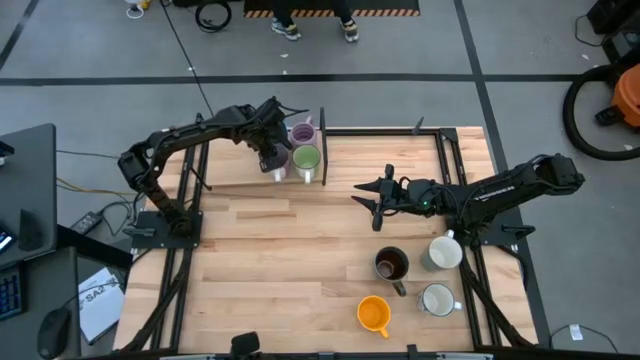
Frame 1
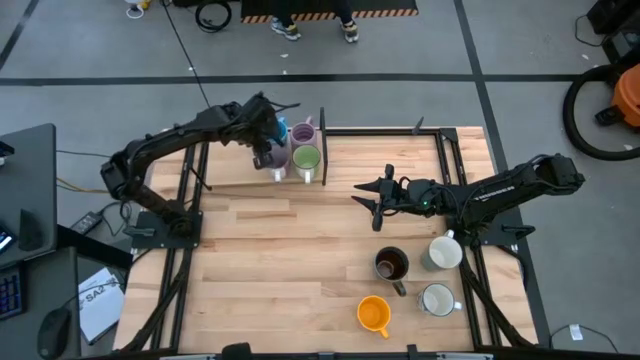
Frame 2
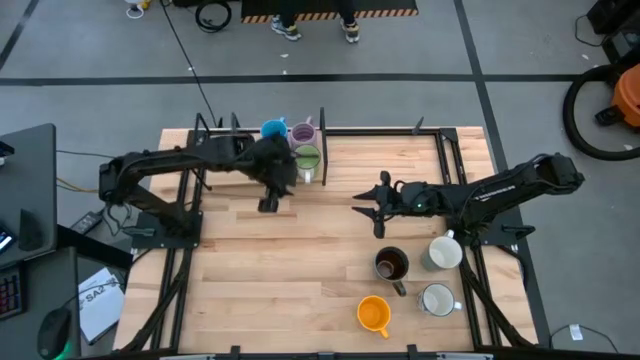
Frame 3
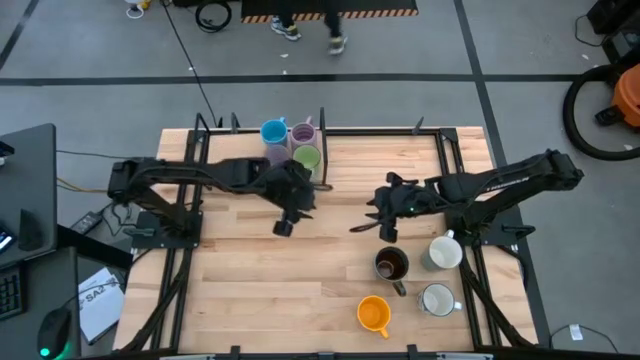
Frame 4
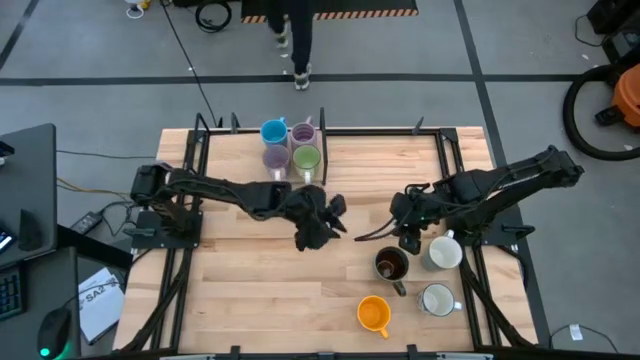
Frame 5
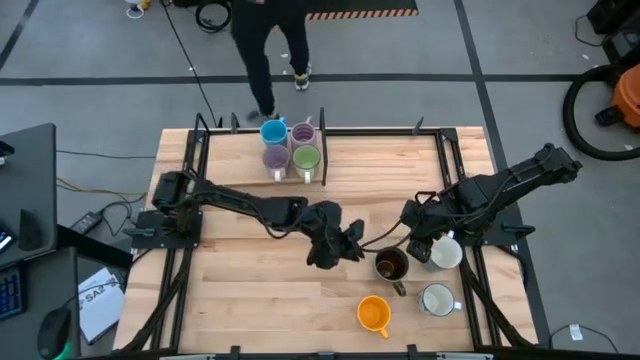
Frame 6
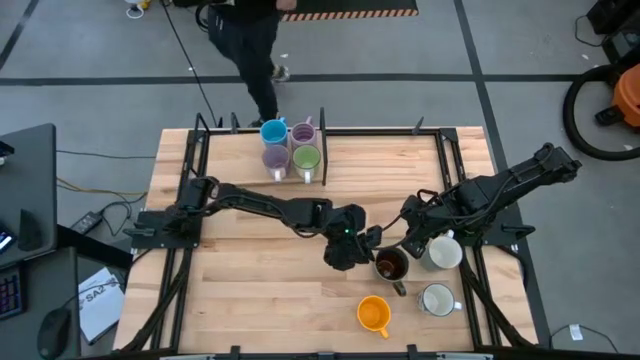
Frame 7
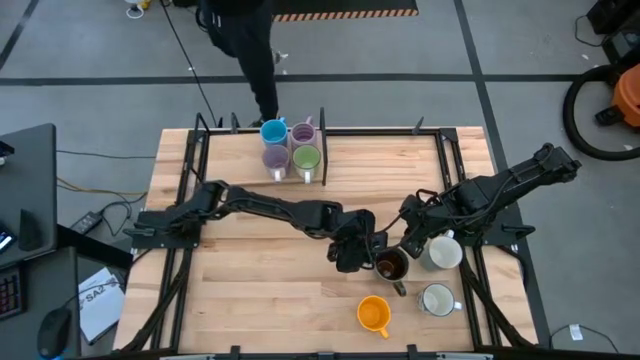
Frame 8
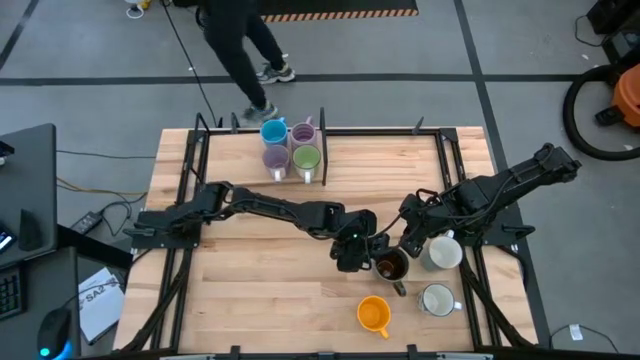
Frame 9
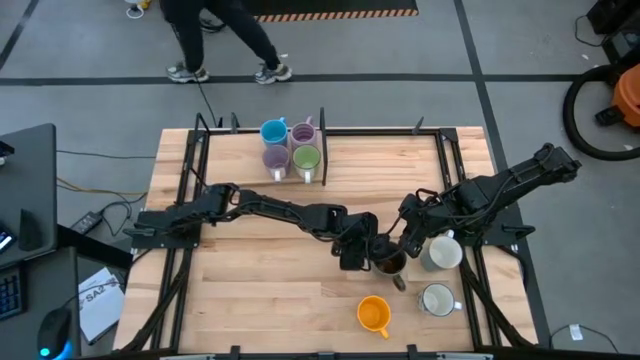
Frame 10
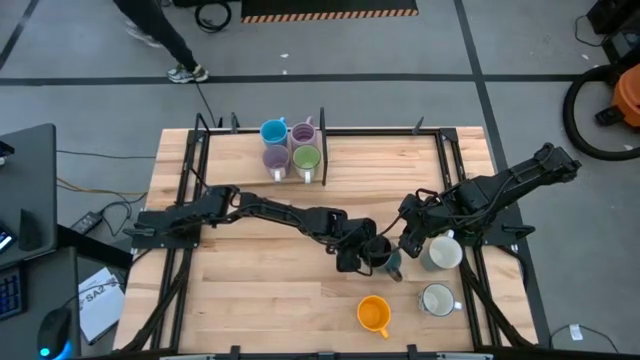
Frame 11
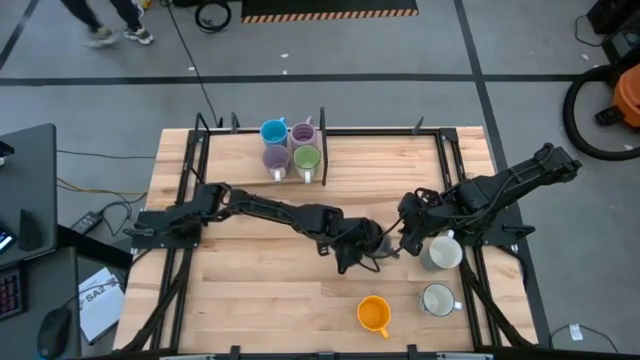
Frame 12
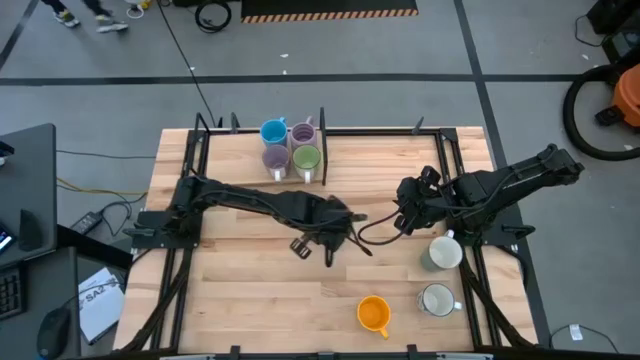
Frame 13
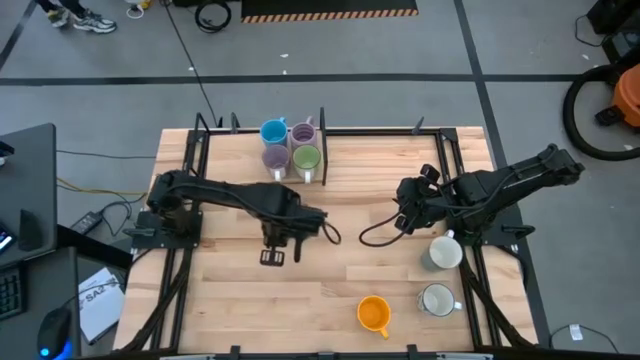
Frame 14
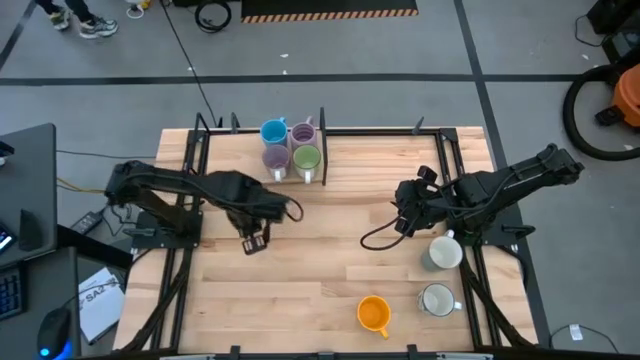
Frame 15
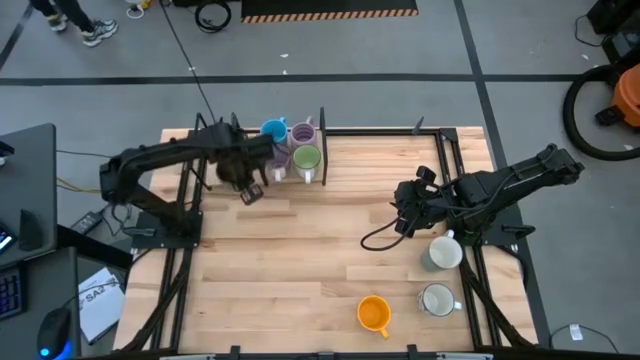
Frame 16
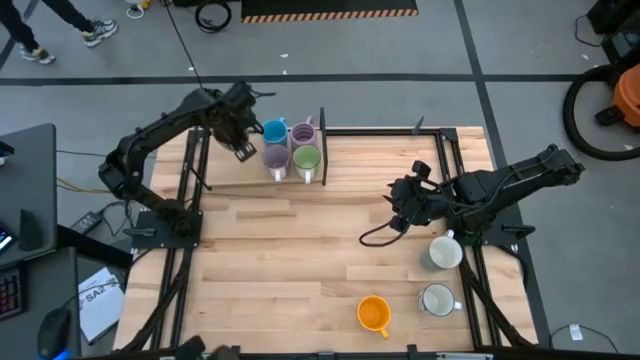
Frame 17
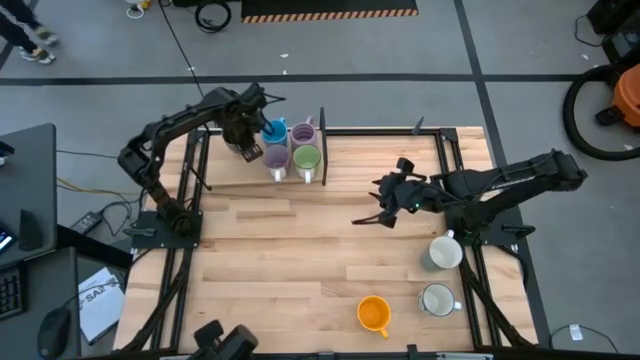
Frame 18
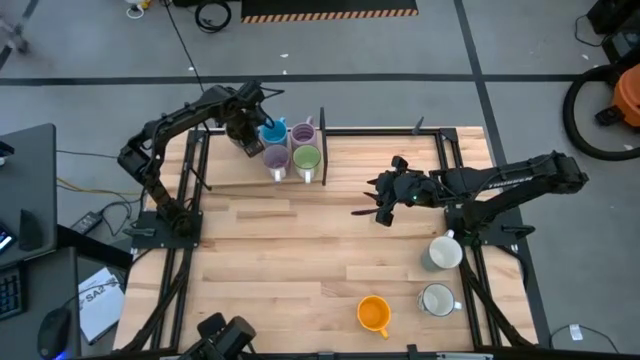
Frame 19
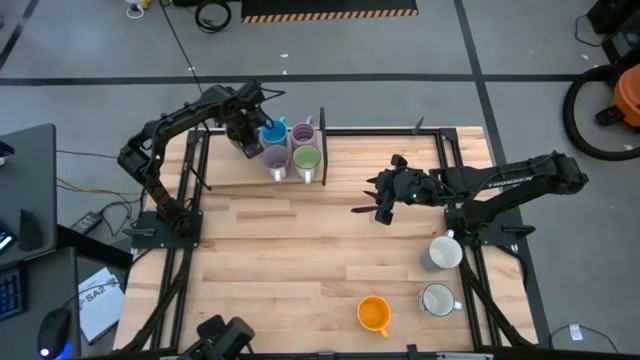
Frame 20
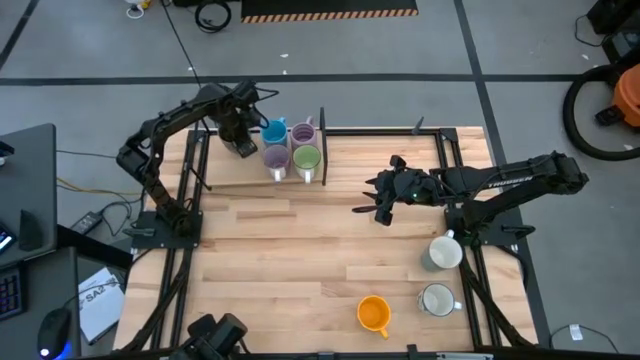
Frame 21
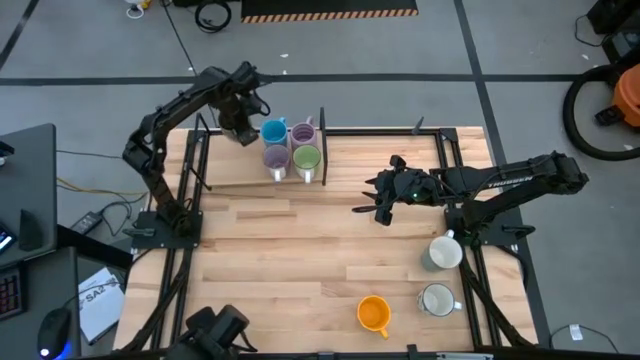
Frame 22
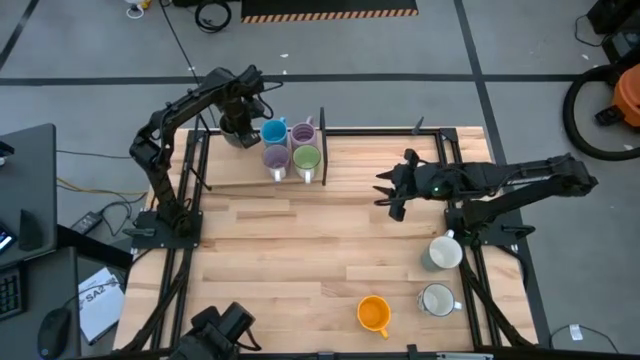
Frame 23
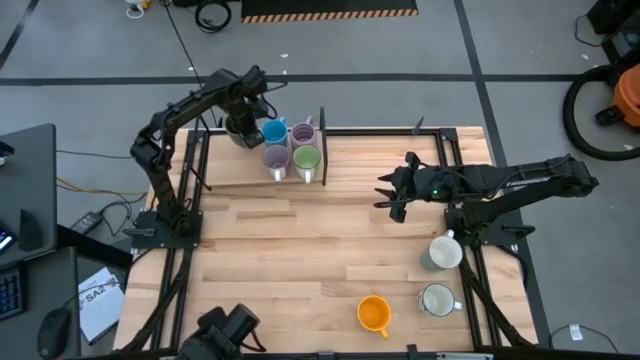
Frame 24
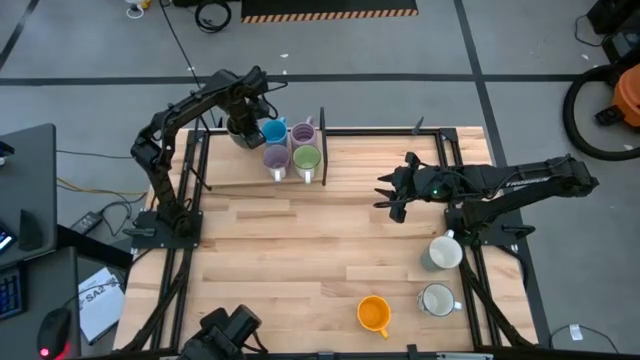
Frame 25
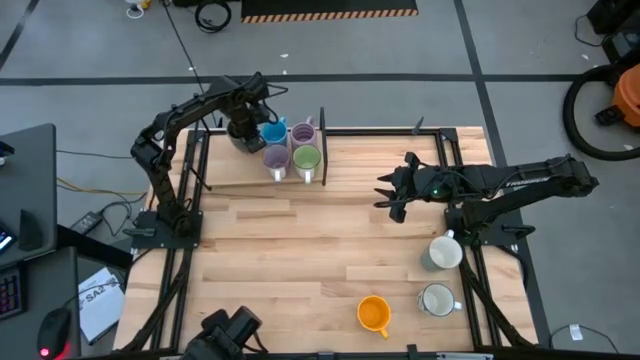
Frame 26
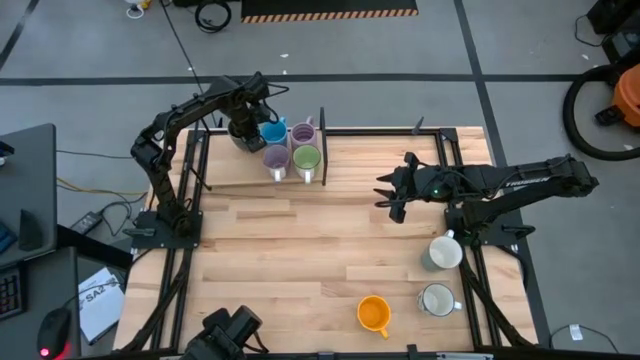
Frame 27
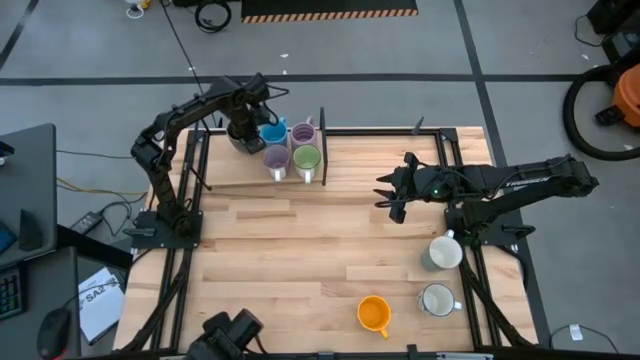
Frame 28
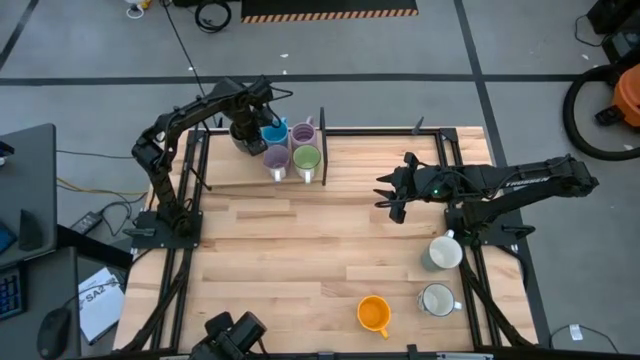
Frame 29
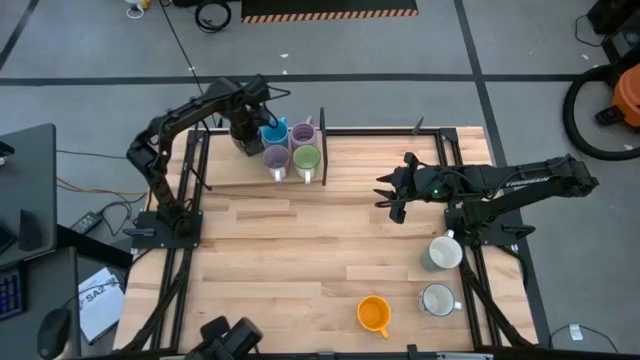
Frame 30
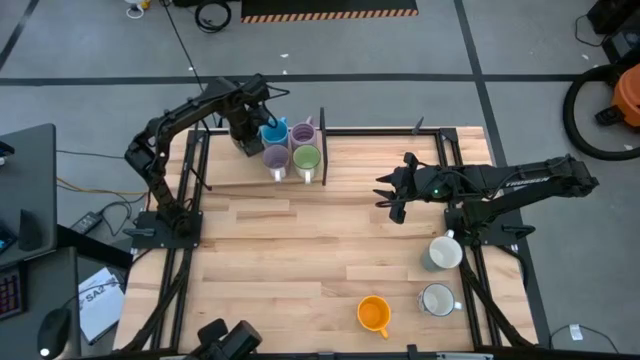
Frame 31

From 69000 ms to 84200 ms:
Task: Place coffee mugs
Put the dark blue patterned mug on the shelf

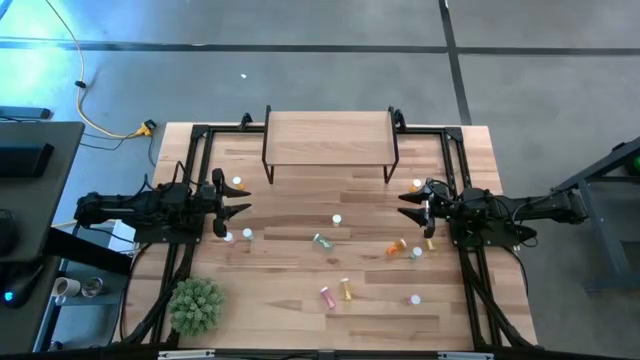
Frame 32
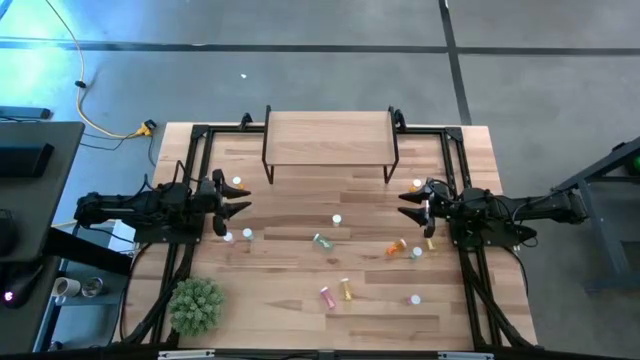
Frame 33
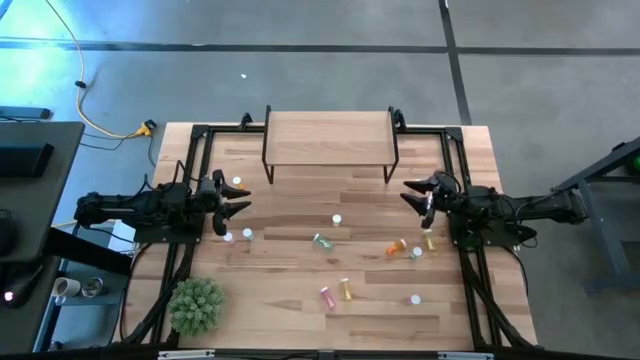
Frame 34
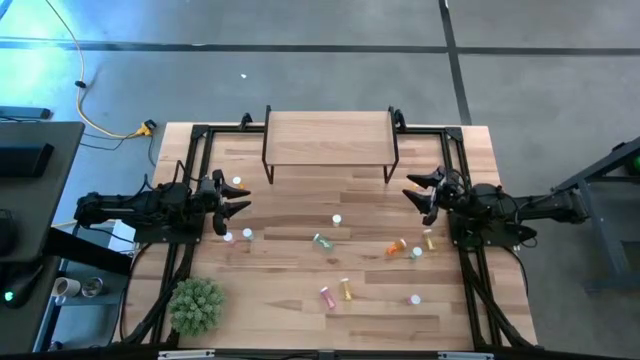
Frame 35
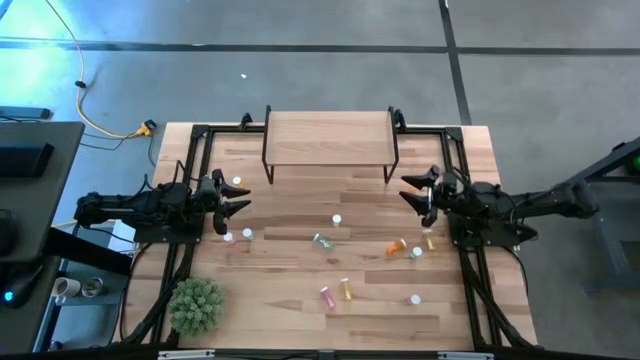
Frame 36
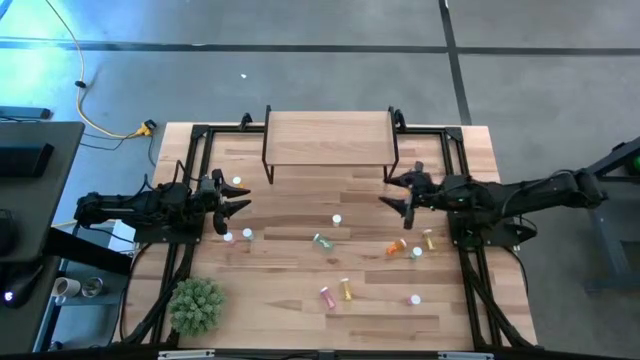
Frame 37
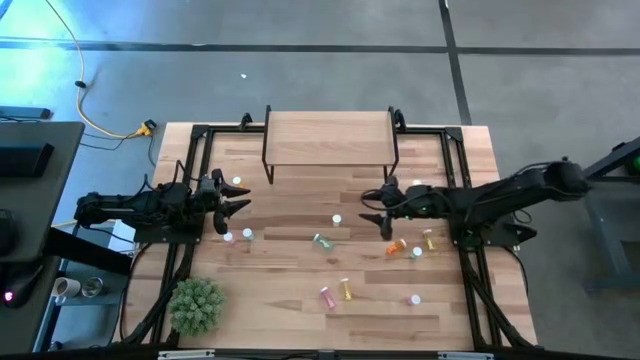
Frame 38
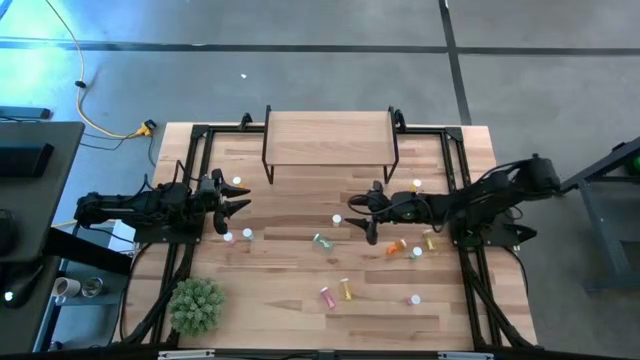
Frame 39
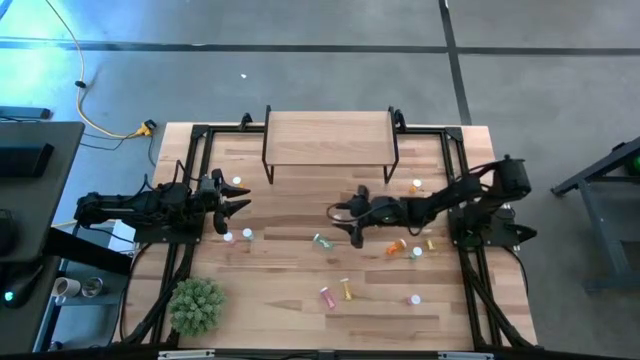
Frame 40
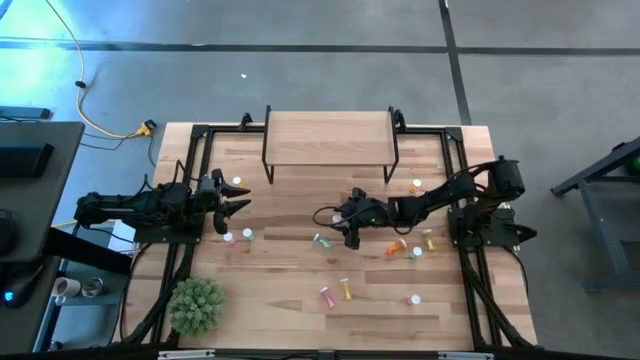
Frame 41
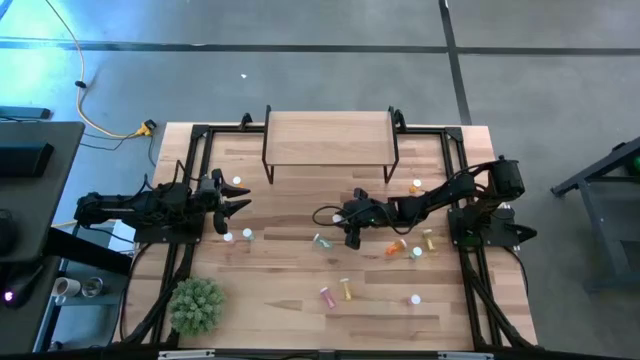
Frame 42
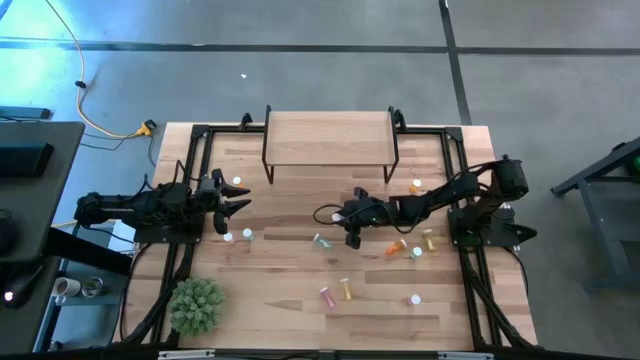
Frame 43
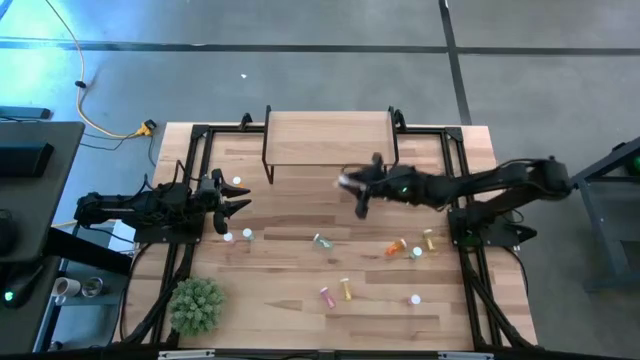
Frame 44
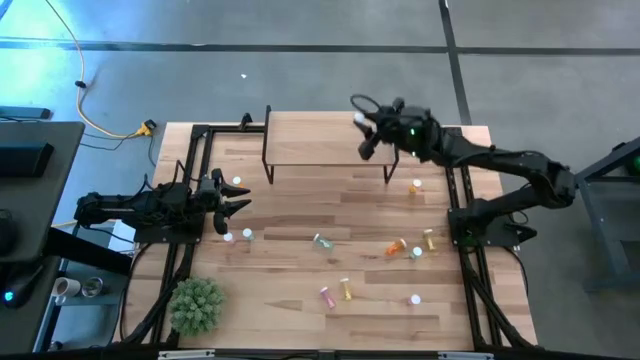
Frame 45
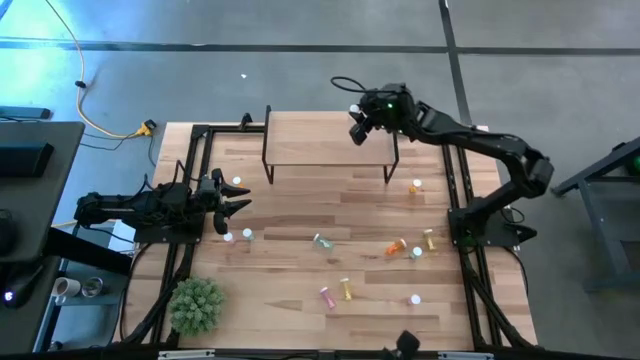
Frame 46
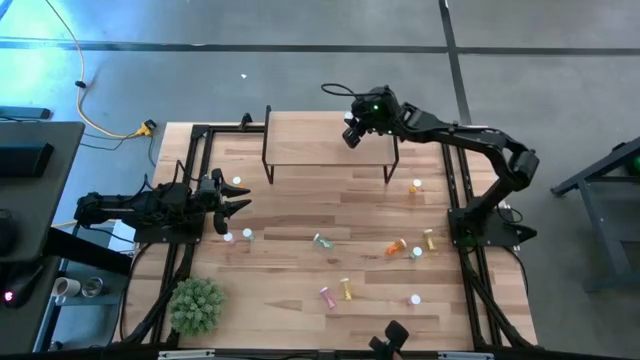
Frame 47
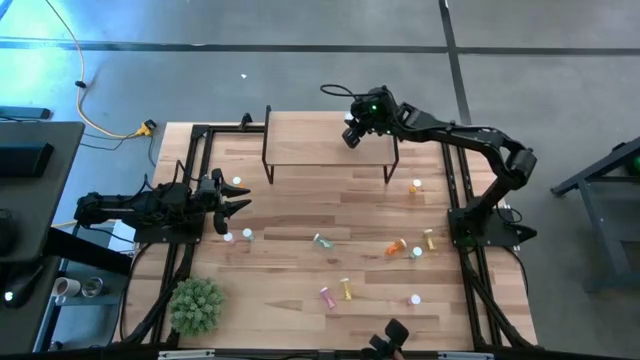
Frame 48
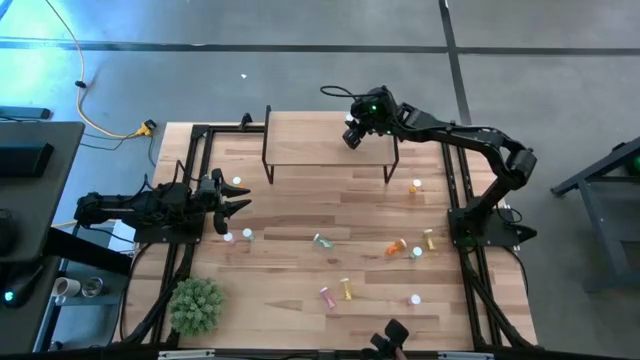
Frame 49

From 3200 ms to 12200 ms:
Task: Pick and place medicine bottles onto shelf by color
Put the top yellow pill bottle on the shelf
